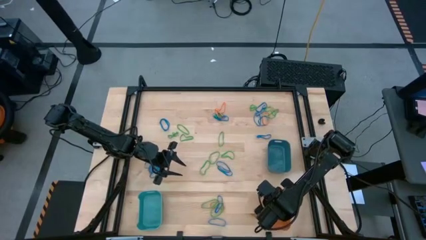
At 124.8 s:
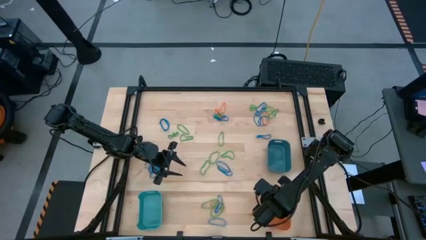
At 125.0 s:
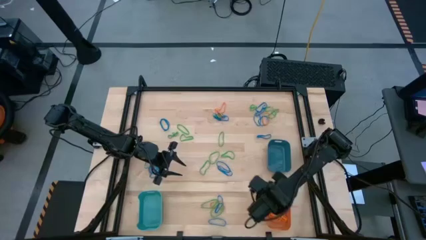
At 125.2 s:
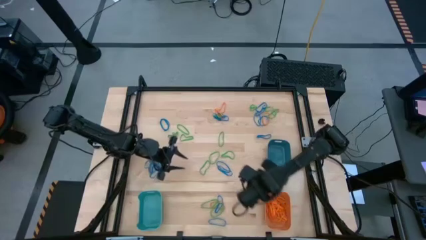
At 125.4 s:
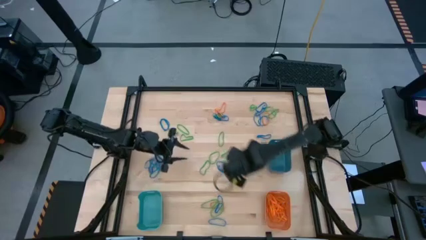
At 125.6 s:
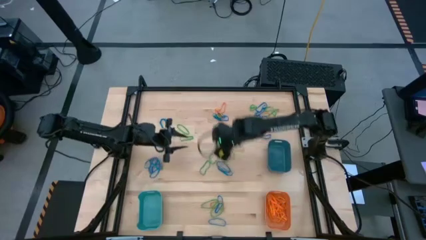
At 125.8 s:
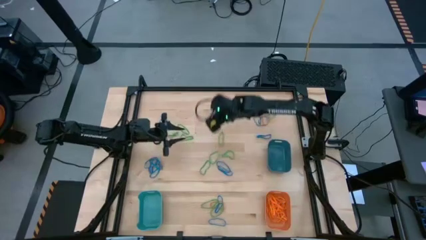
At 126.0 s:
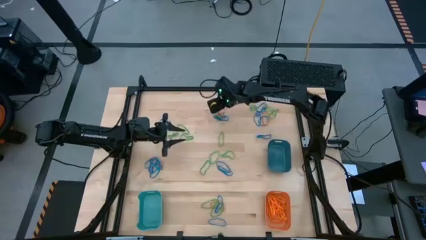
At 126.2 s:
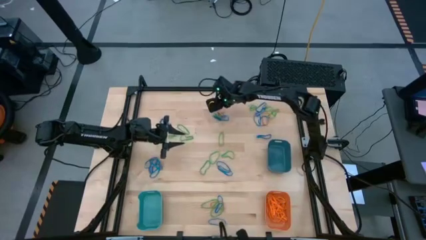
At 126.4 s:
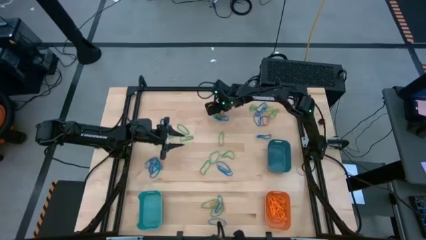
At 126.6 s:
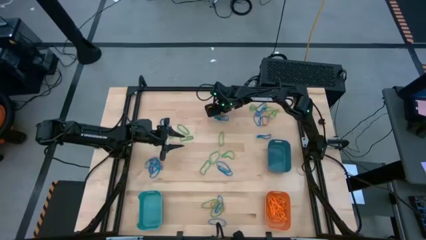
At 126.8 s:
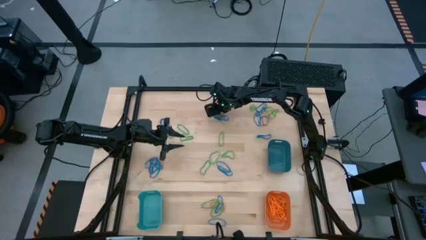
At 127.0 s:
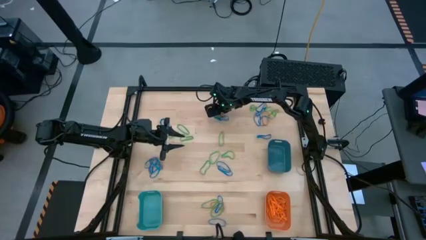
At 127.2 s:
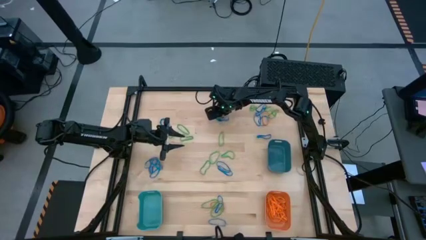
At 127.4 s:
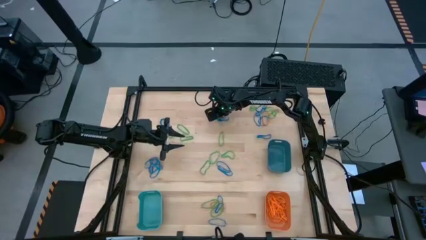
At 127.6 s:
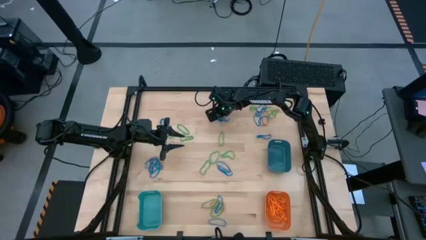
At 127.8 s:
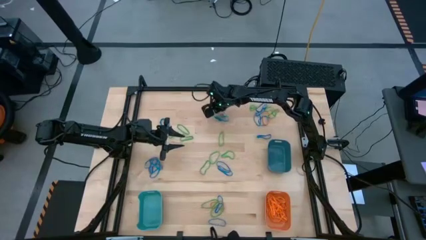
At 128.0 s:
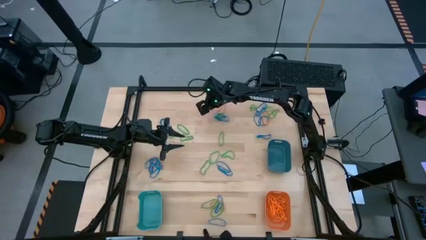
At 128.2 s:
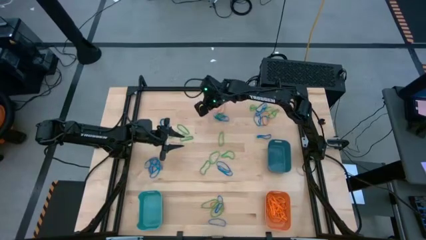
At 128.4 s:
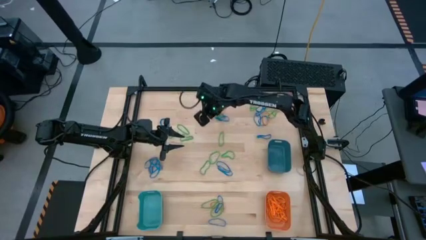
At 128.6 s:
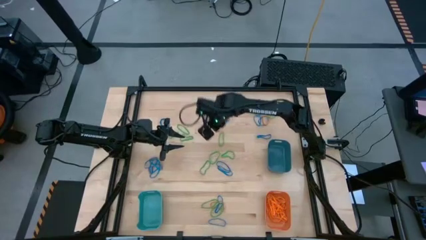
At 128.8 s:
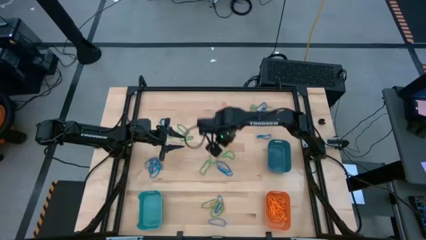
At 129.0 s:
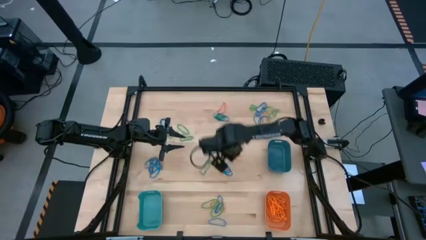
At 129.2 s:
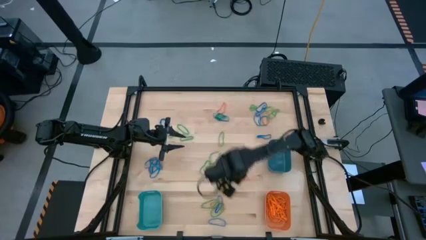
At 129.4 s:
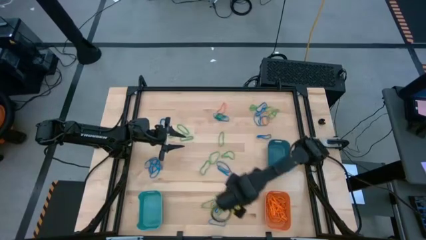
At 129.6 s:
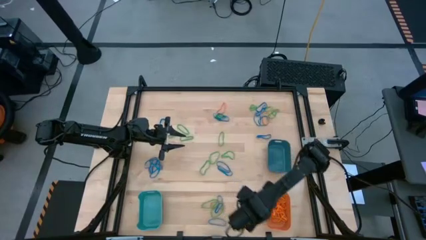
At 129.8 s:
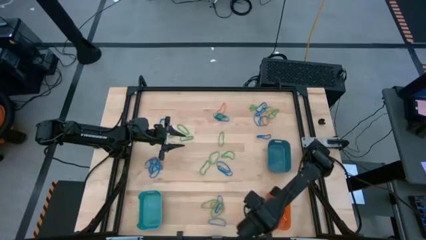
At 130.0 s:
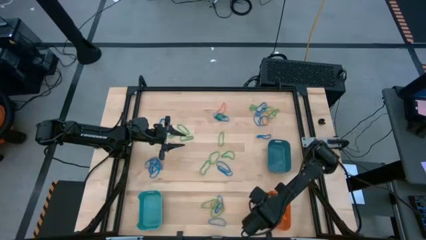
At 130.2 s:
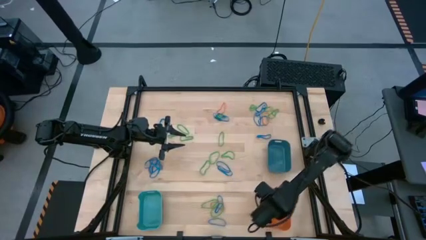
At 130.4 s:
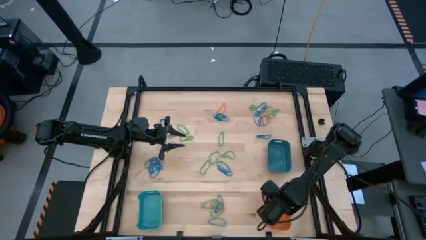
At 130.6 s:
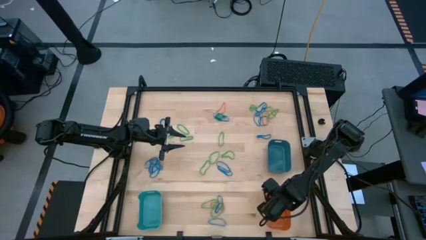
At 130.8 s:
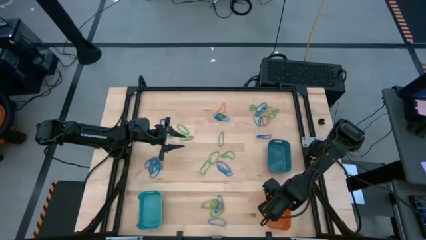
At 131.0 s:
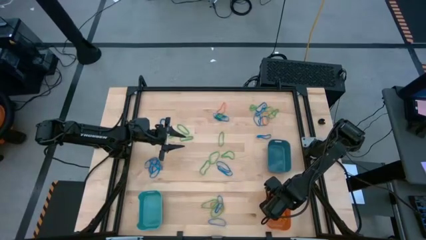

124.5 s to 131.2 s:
Task: Sort rubber bands into baskets
Put the orange rubber band into the orange bin

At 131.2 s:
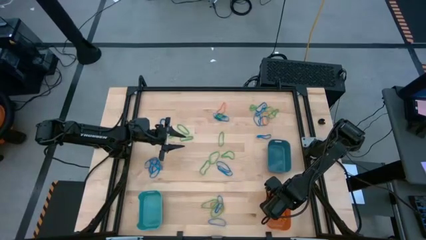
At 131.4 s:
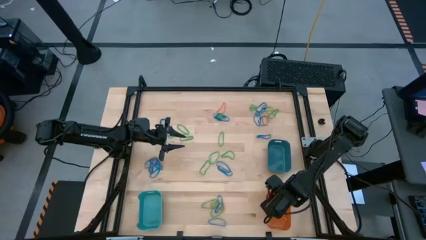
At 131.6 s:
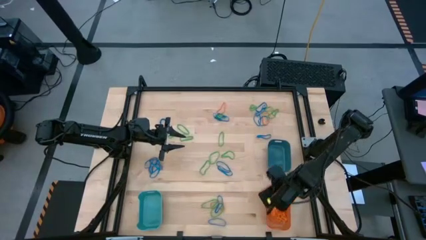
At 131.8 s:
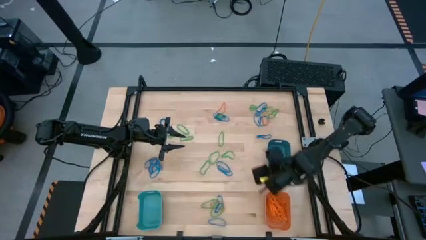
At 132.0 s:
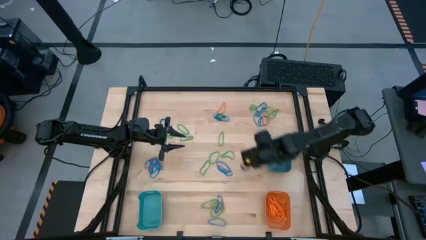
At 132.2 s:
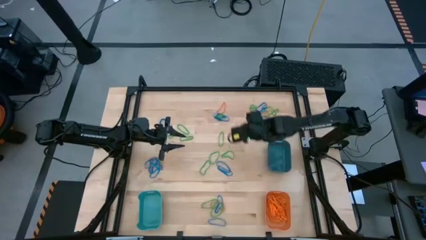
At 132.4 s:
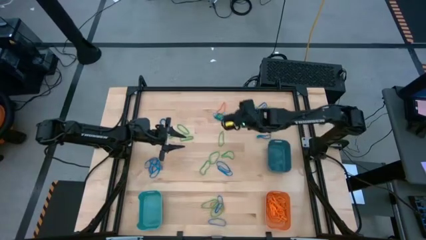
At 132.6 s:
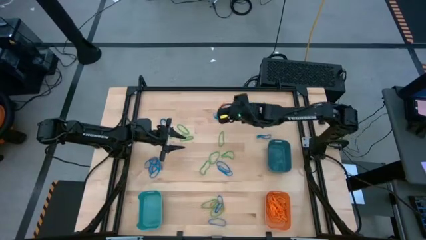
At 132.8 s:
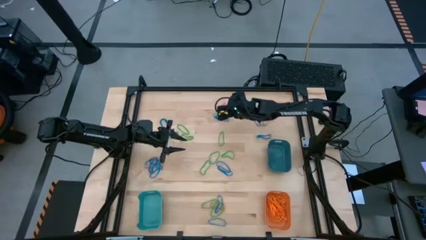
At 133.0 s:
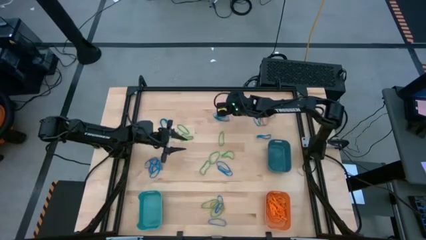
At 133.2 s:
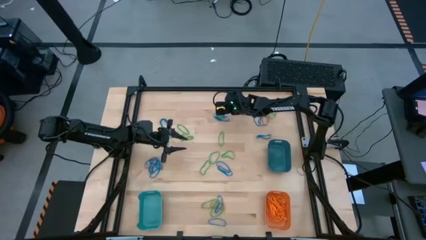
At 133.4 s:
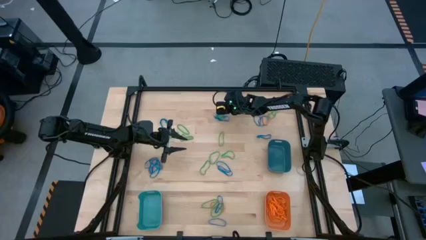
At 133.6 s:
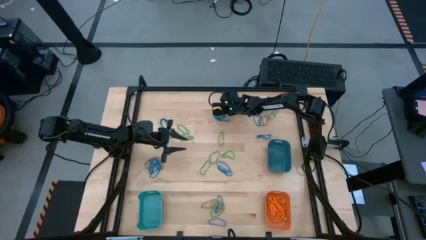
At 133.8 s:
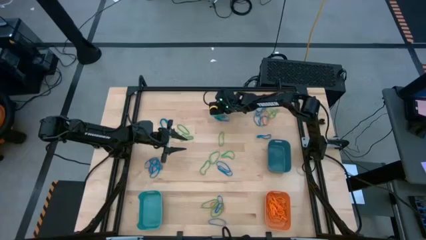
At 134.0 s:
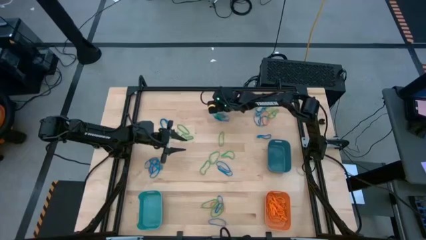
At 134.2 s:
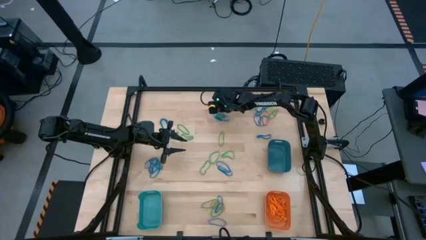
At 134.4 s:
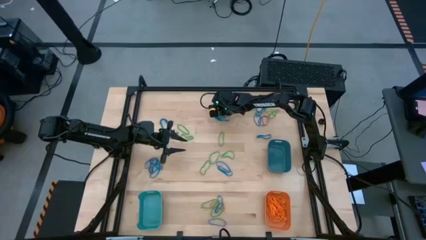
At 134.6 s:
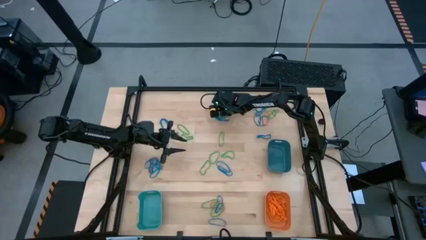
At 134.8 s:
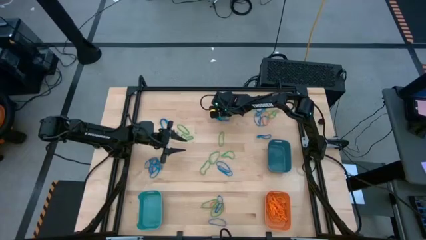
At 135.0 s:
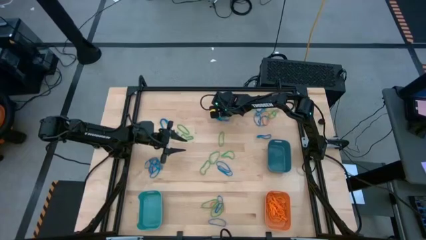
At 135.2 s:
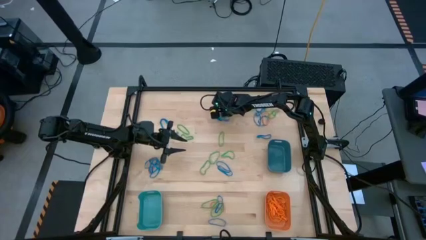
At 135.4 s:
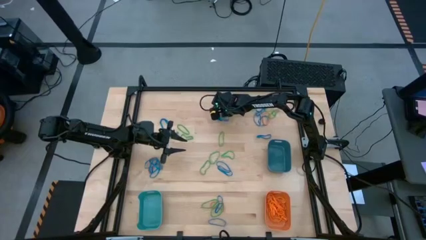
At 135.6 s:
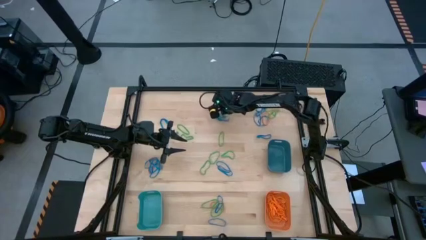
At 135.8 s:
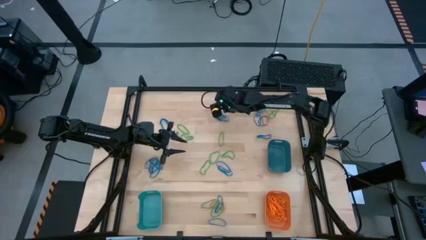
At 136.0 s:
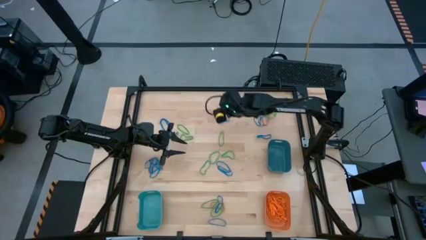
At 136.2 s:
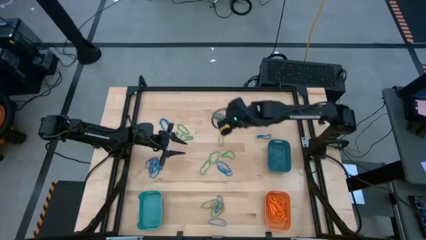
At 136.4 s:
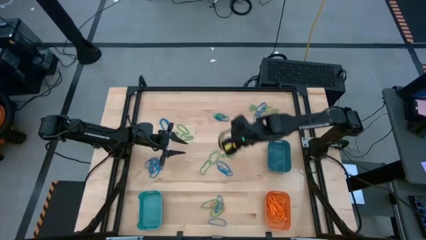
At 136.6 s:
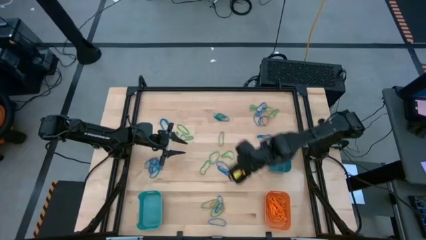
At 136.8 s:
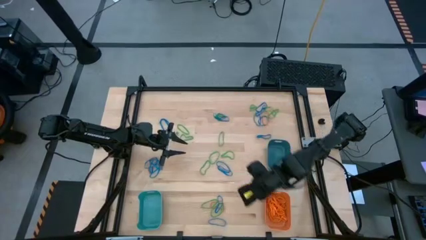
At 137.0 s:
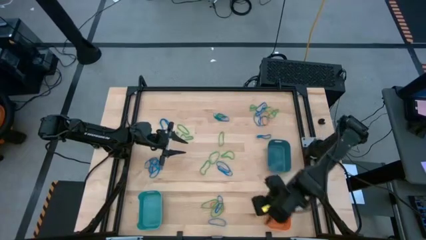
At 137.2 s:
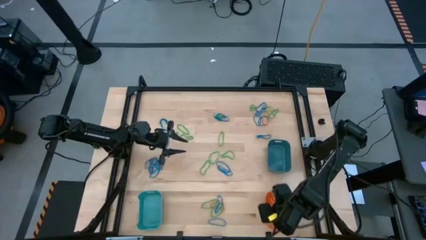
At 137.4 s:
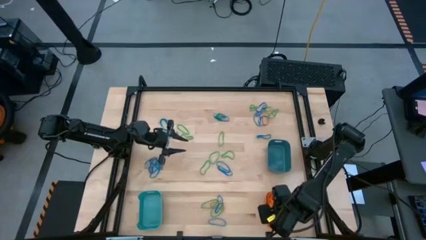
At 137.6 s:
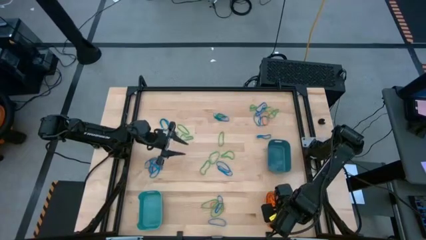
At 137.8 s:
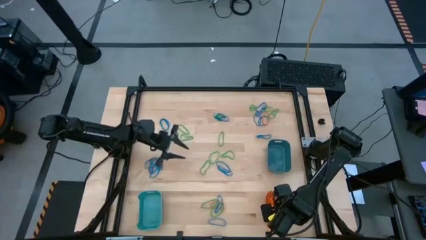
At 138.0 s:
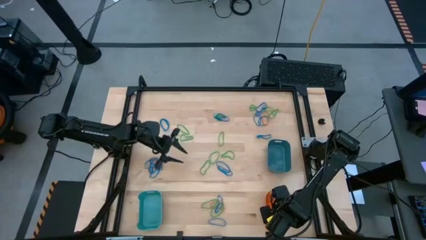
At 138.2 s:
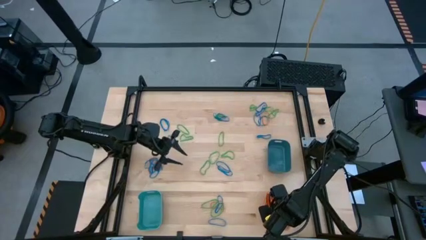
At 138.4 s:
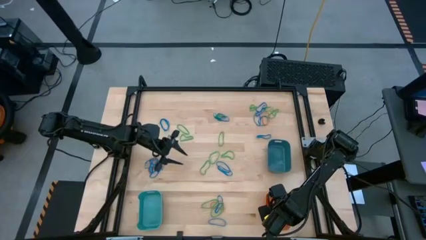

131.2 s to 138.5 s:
Put the orange rubber band into the orange bin

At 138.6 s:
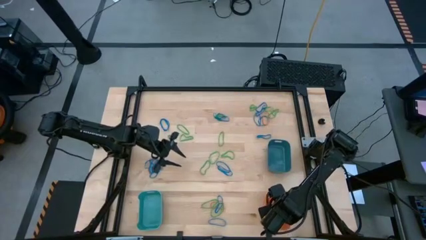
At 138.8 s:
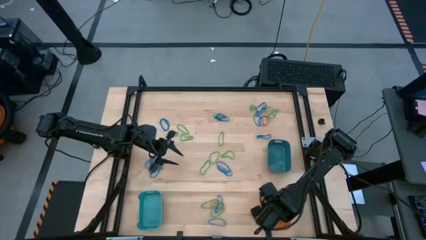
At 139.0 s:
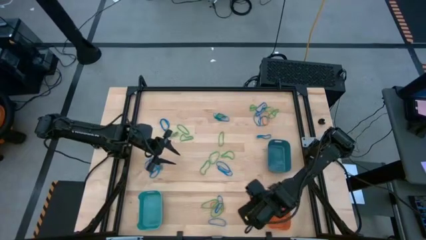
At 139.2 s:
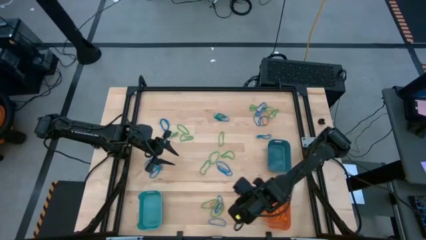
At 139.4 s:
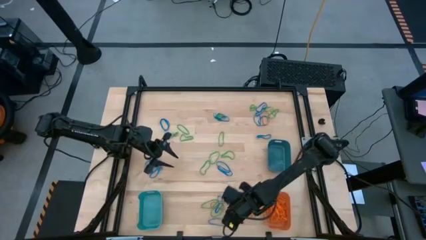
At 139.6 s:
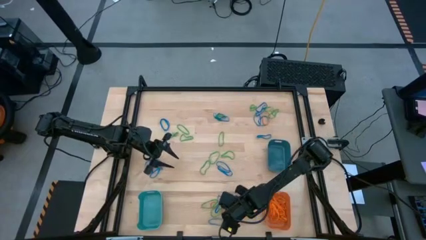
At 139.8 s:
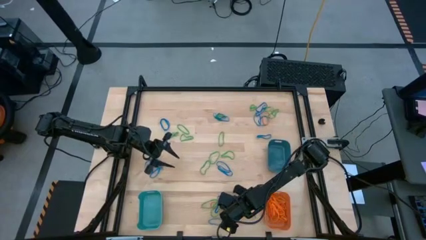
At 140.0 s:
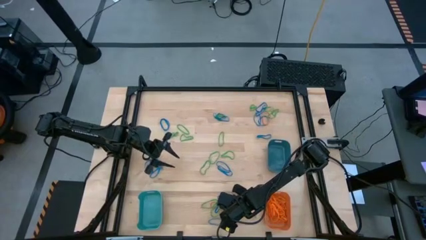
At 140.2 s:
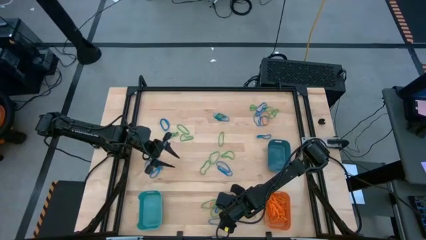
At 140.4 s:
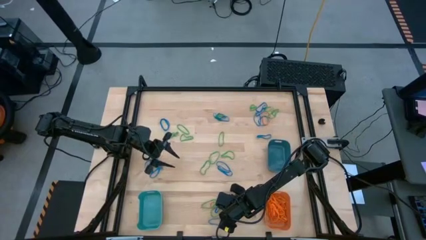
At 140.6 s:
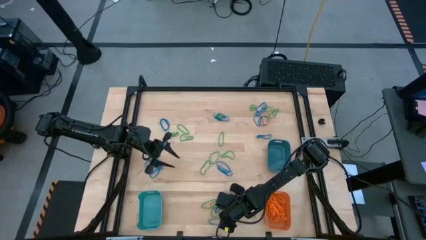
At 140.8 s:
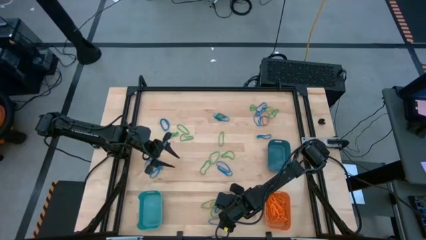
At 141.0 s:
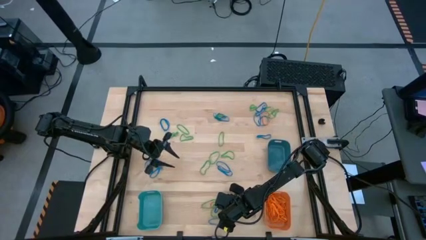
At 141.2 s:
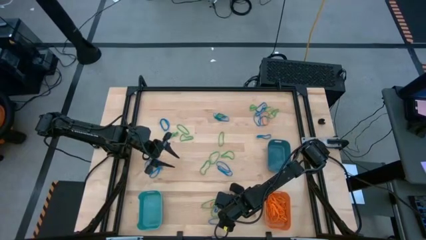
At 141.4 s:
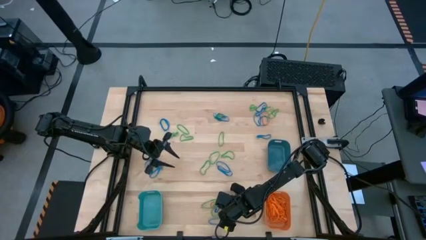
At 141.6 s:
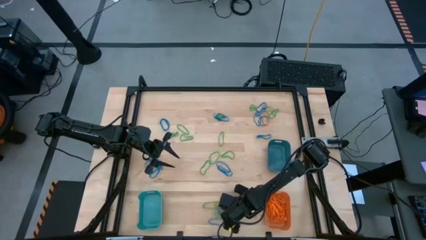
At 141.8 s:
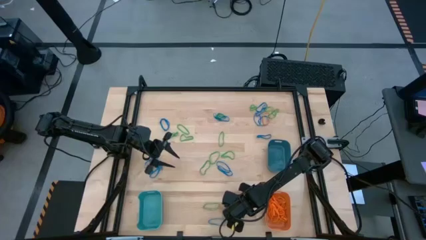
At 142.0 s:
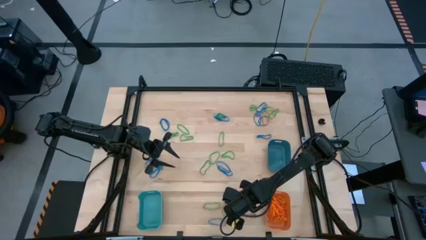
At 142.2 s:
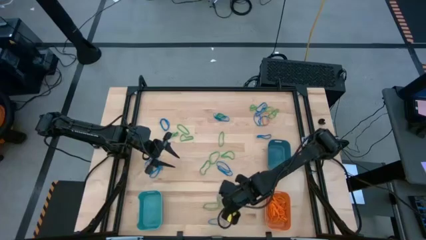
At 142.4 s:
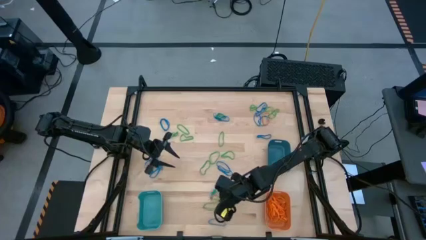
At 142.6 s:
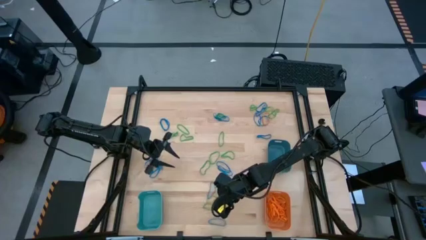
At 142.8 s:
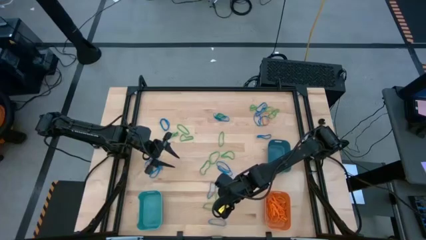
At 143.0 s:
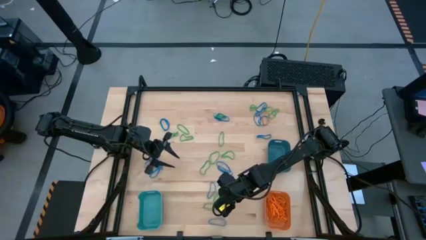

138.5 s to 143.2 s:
Put the orange rubber band into the orange bin
